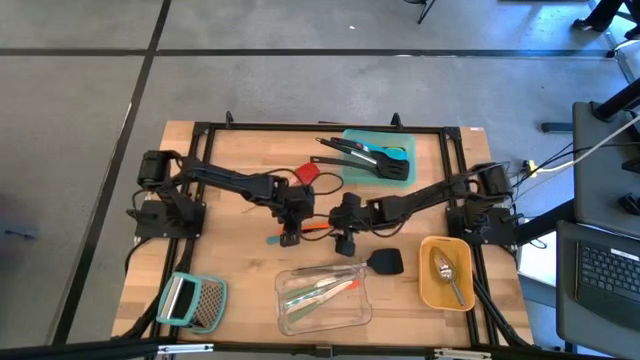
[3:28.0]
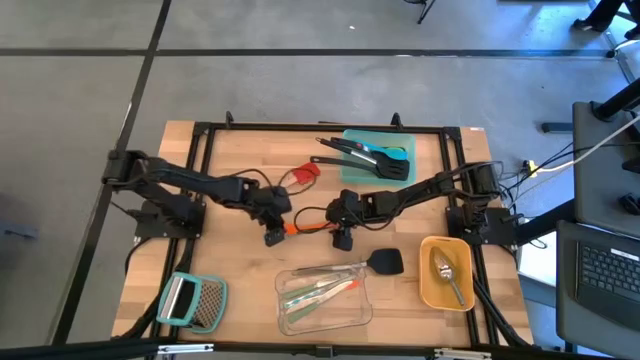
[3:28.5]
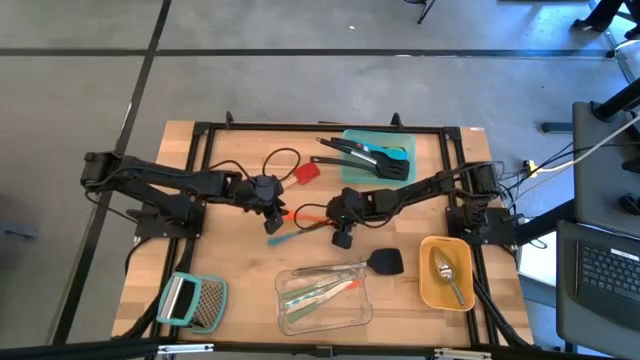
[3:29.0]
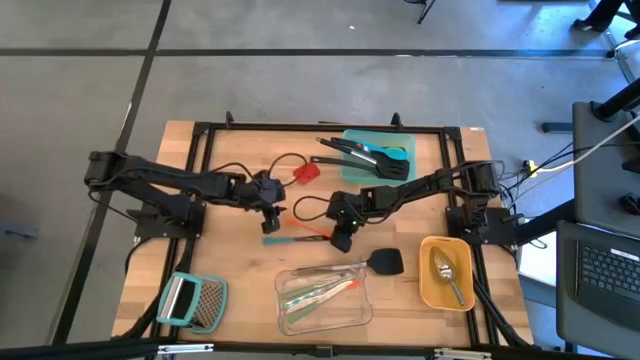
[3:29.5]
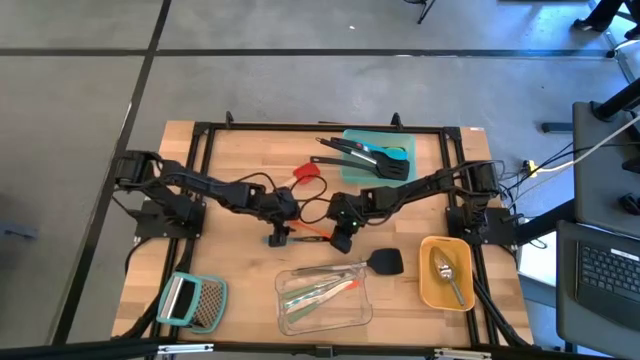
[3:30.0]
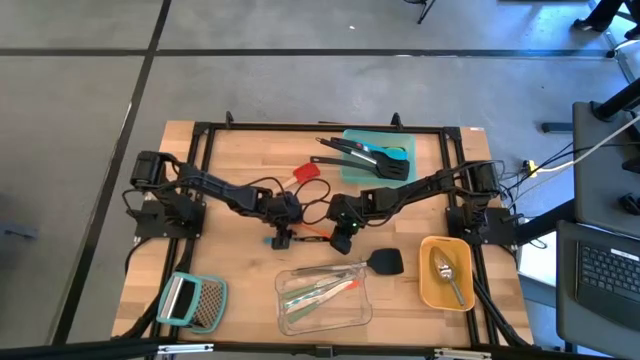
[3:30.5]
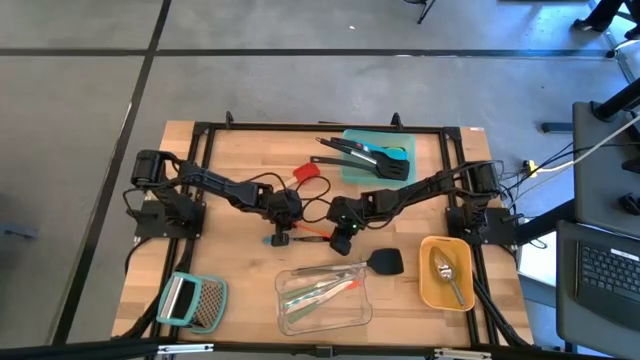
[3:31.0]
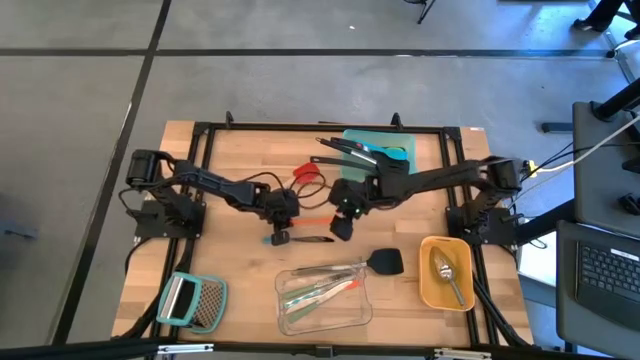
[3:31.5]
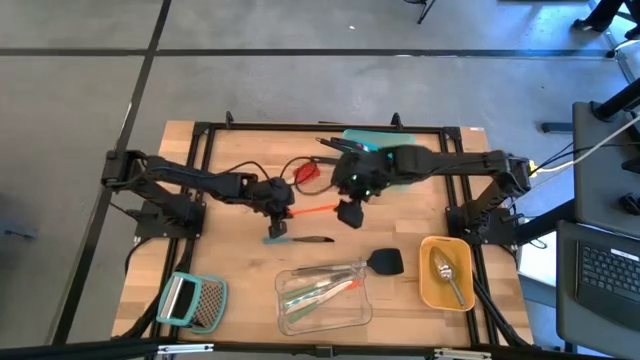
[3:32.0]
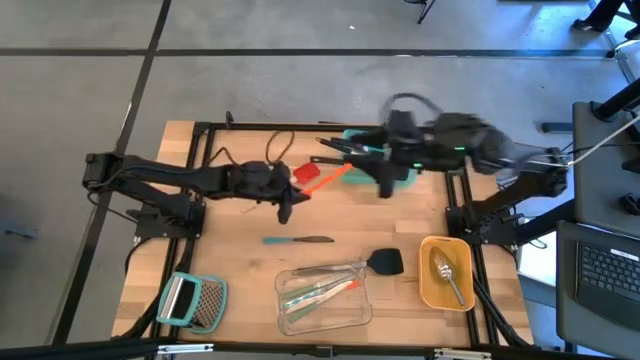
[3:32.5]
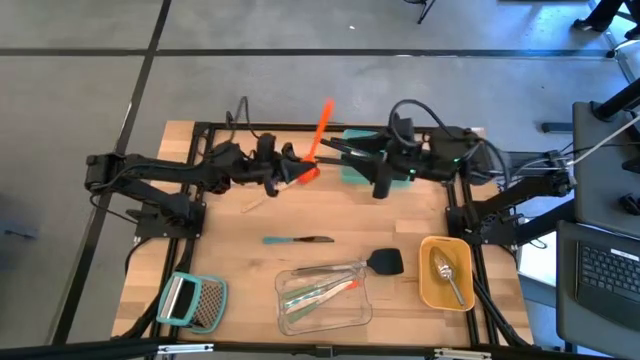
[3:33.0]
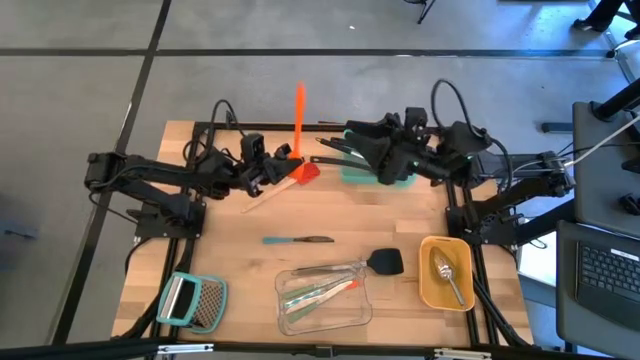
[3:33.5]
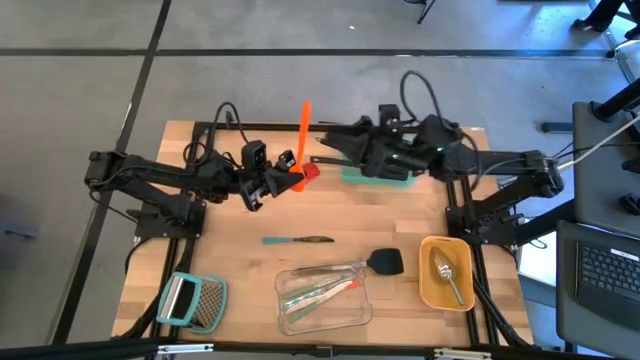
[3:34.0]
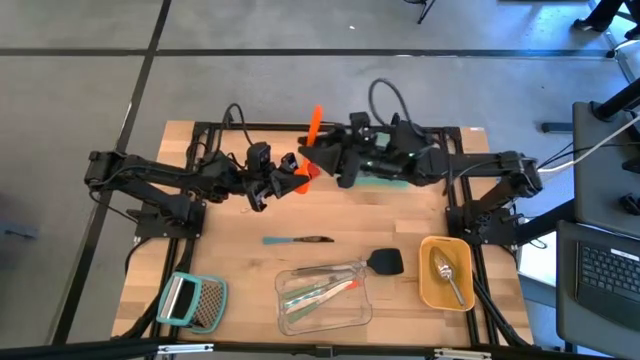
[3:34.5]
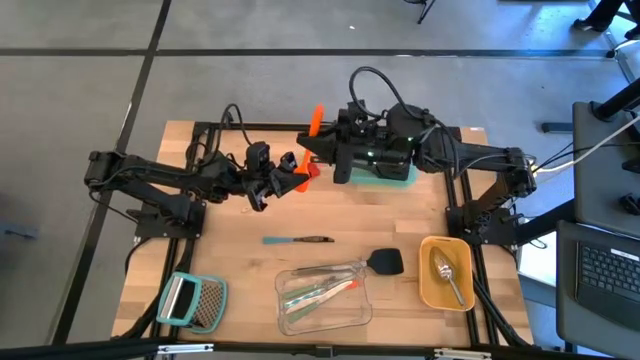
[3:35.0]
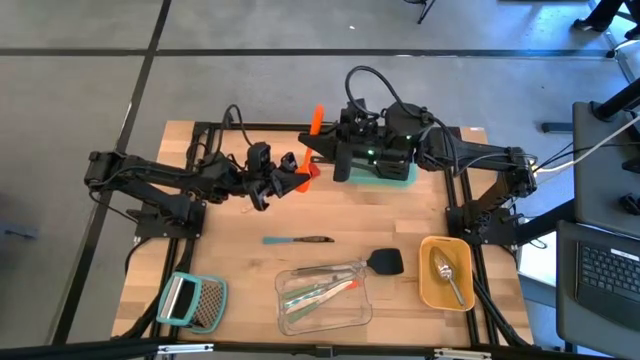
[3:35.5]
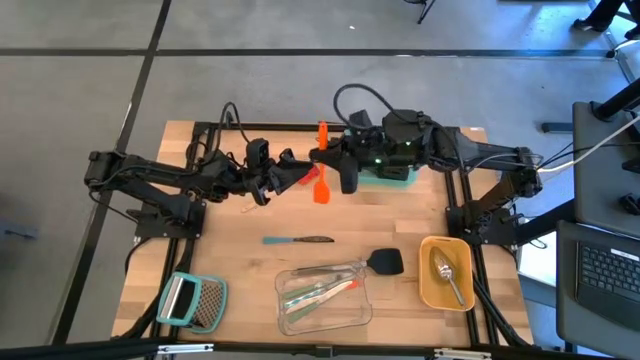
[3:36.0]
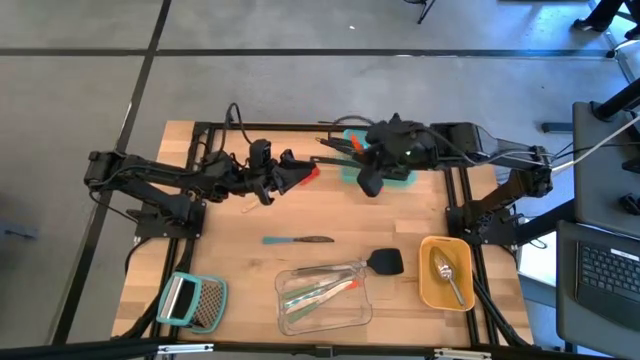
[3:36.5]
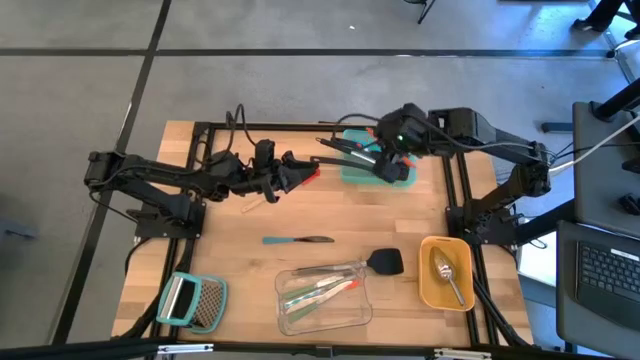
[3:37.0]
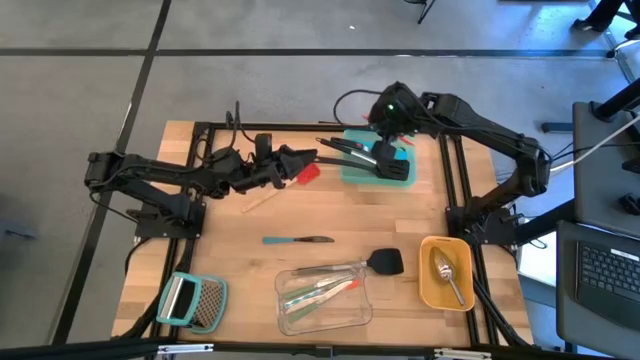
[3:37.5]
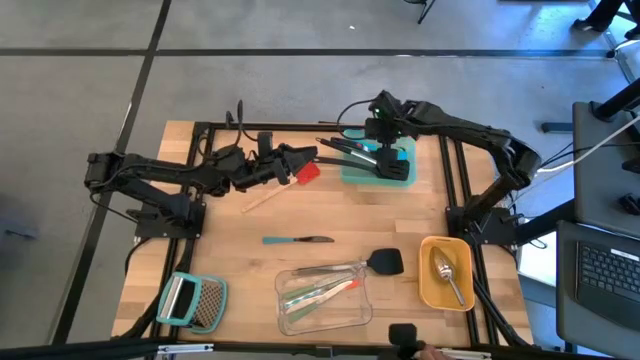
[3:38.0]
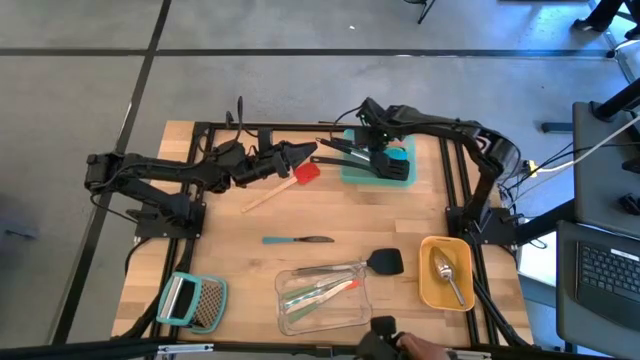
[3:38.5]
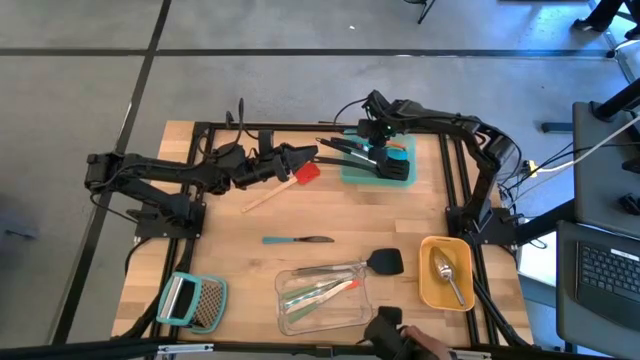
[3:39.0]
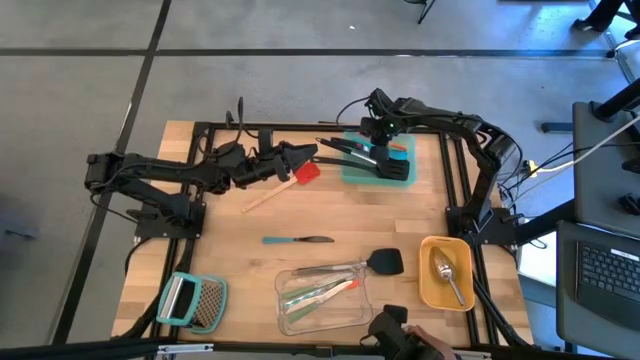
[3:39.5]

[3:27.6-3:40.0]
Task: Pick & Place Kitchen Items
Put the orange spatula into the green bin

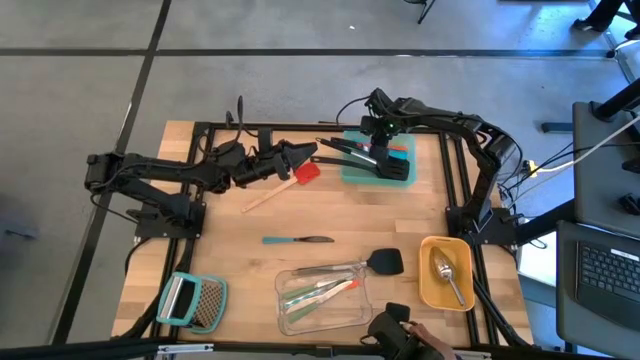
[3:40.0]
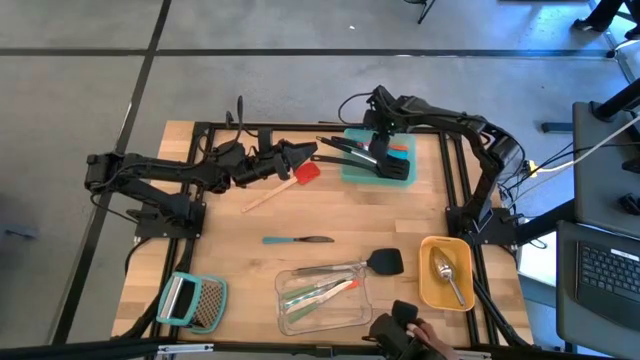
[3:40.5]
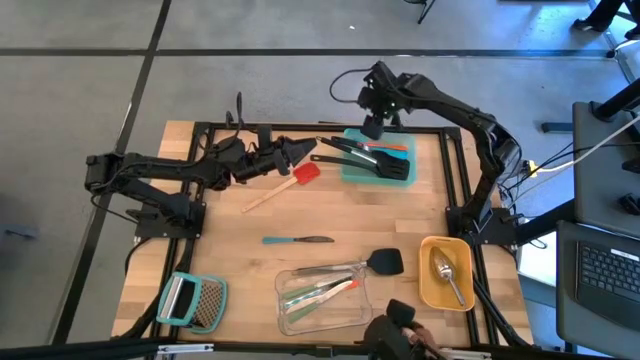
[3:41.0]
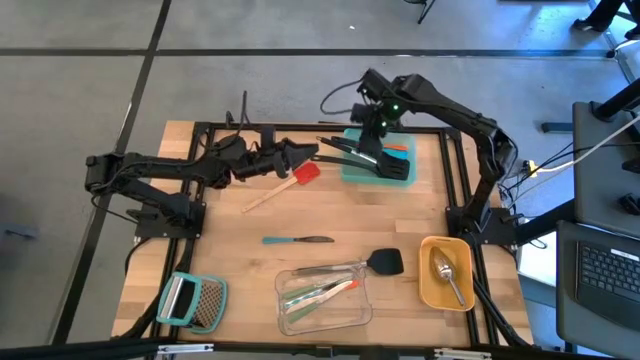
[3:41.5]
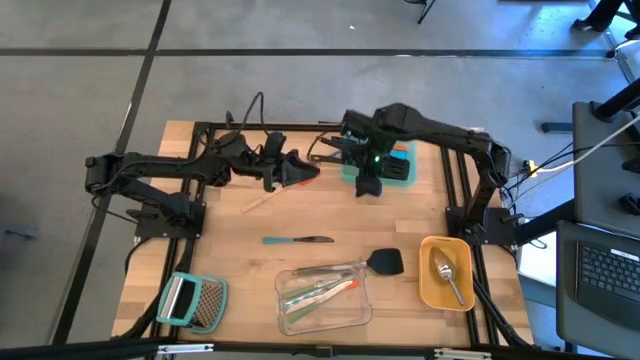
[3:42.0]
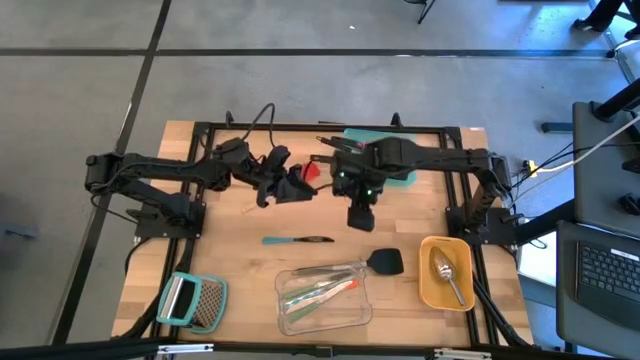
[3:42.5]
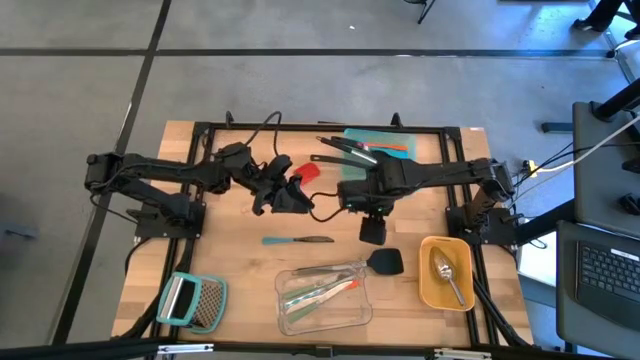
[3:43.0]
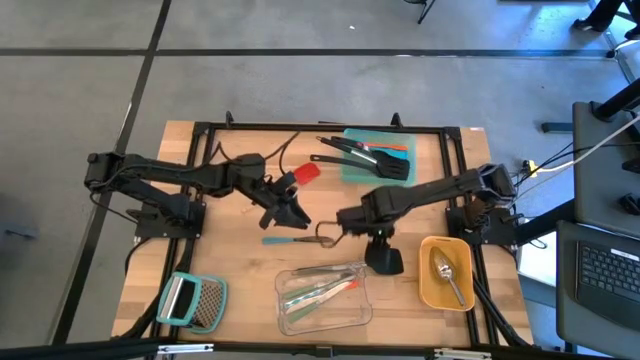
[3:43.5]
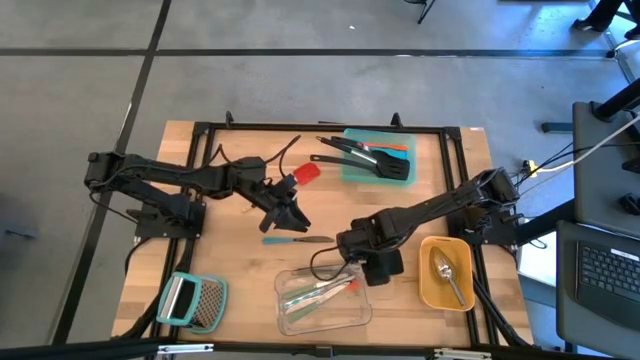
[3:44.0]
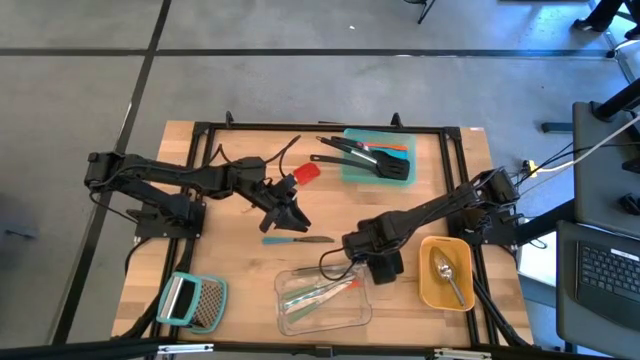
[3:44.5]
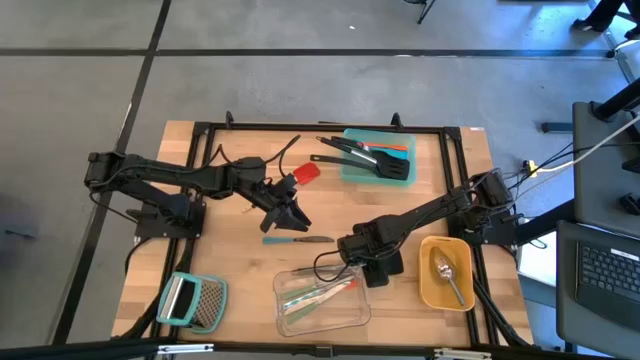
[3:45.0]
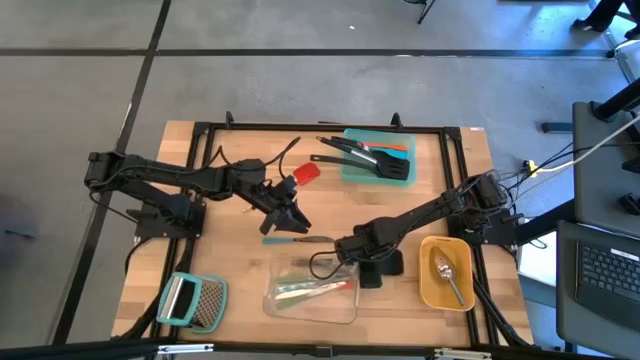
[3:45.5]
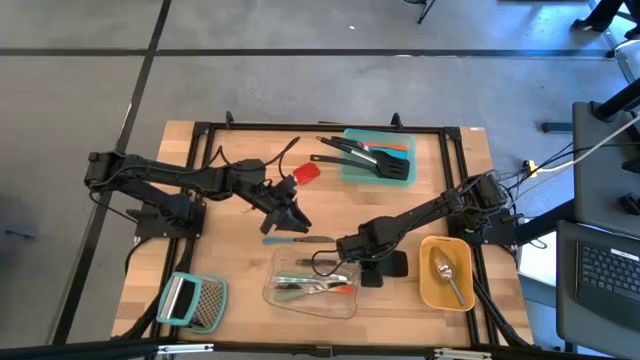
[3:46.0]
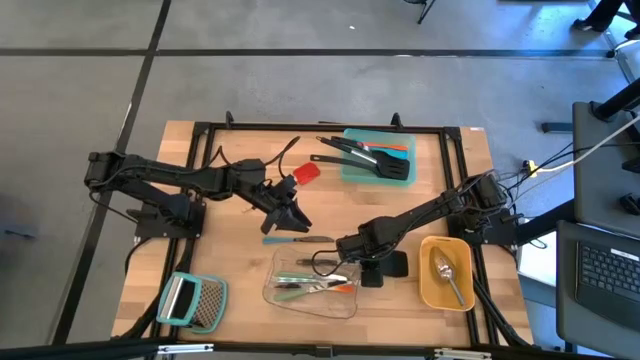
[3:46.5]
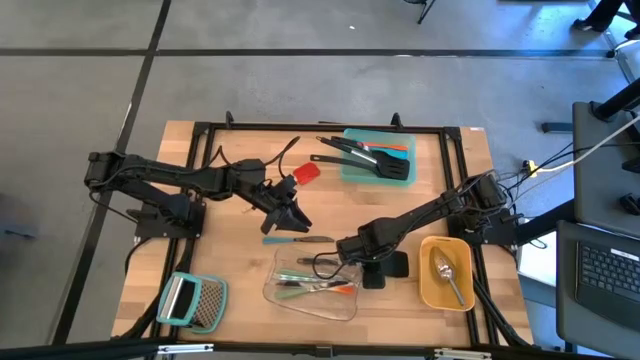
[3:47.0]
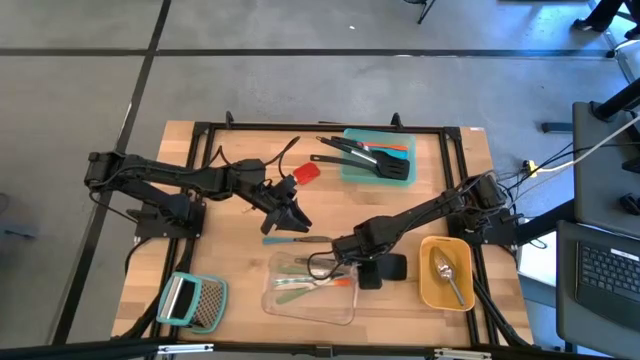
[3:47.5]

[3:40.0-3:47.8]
Put the black spatula into the green bin
